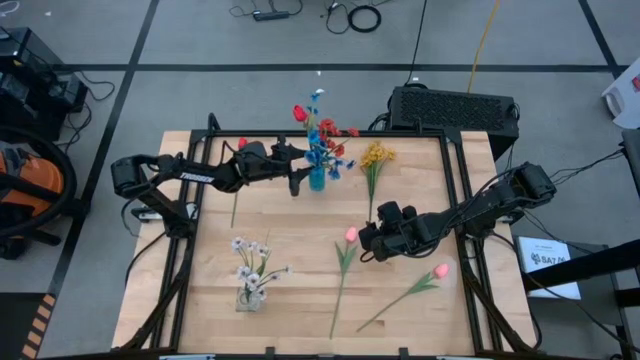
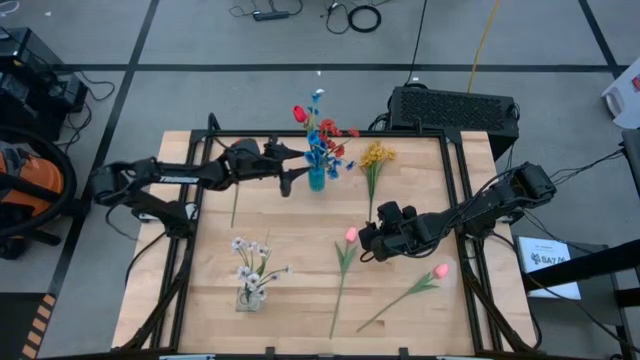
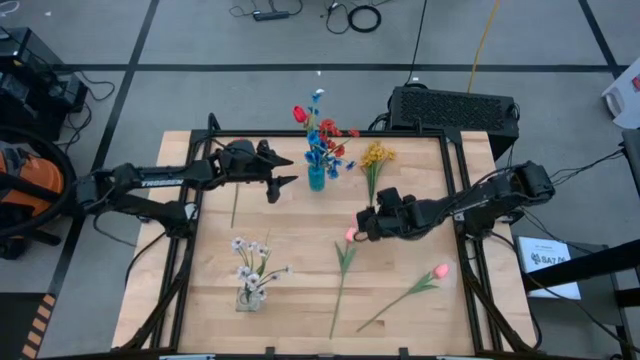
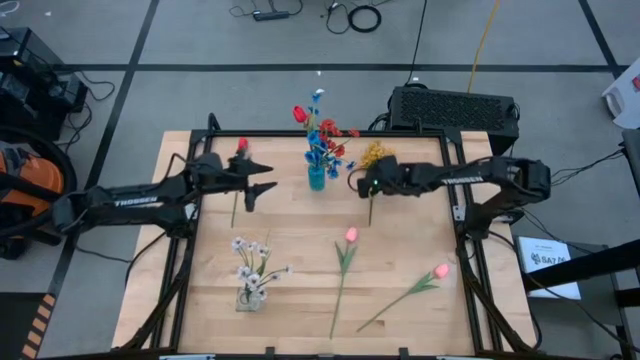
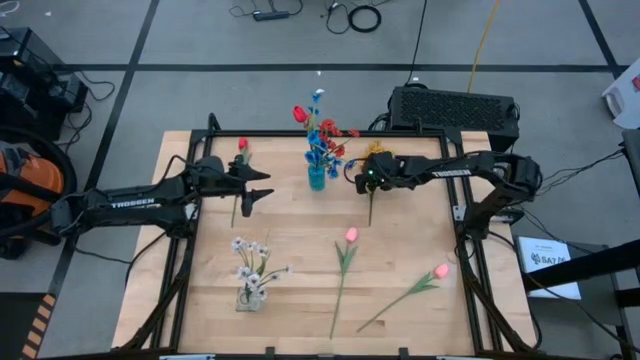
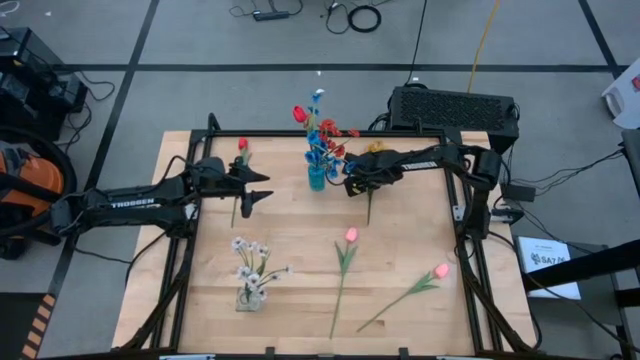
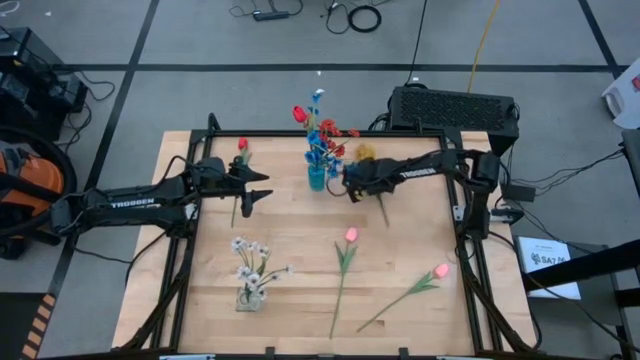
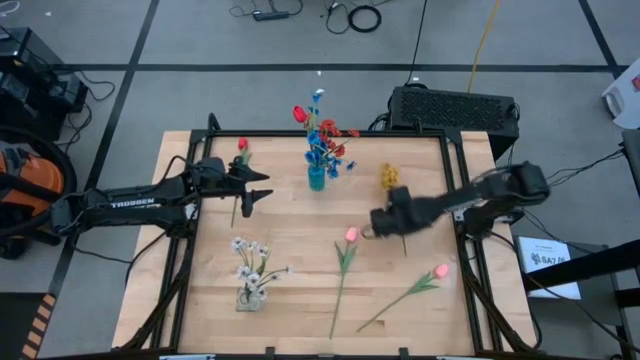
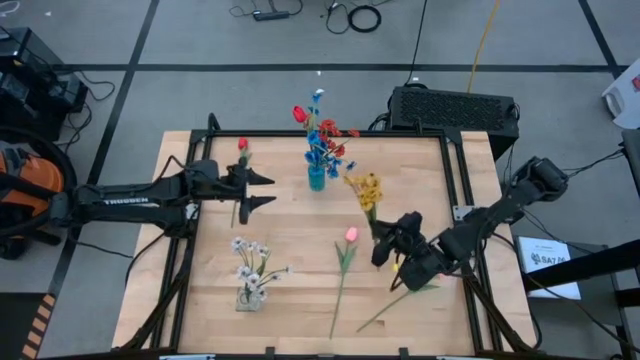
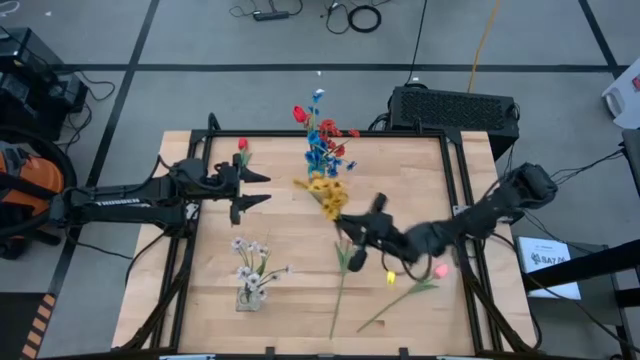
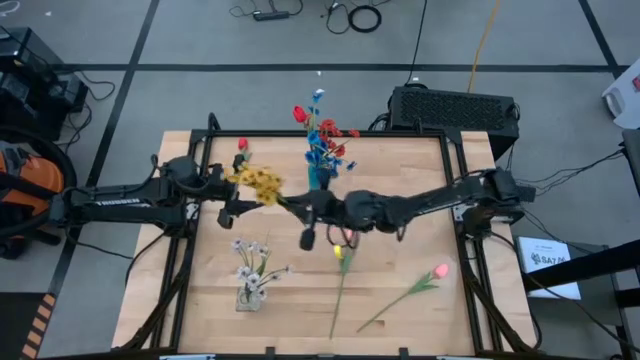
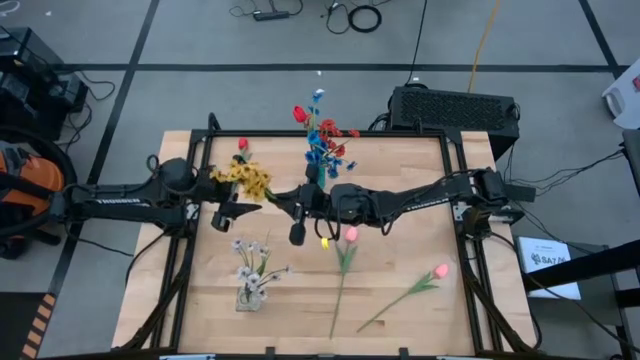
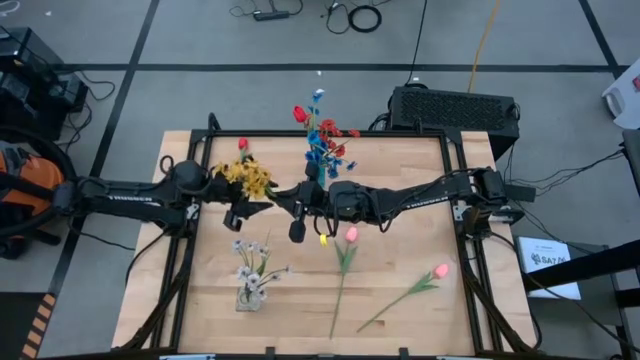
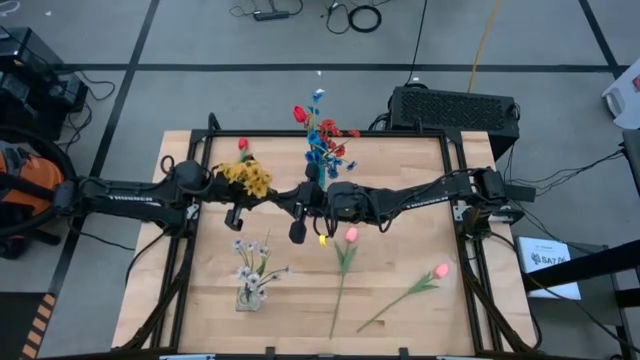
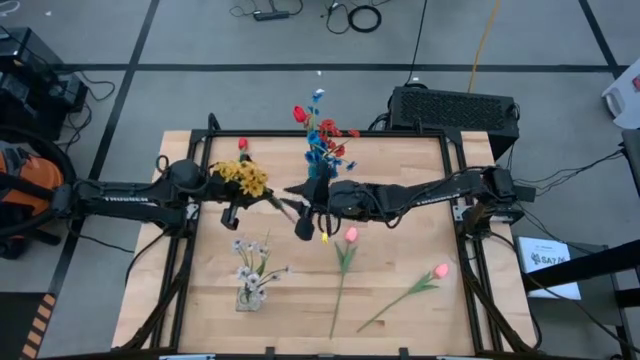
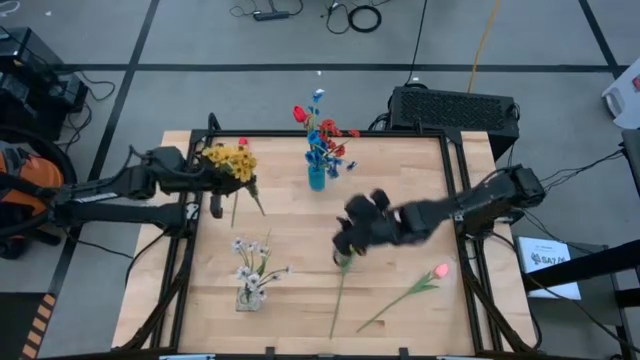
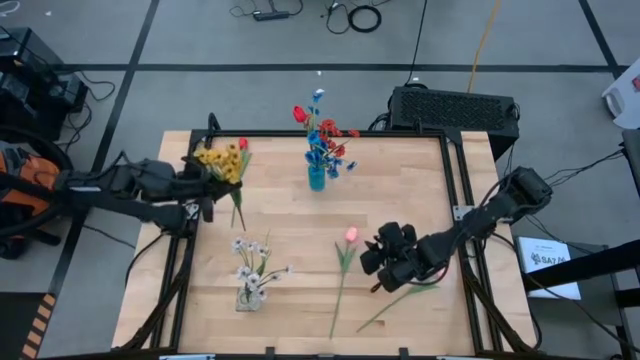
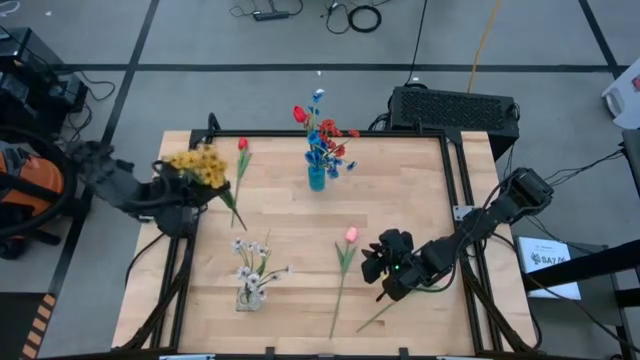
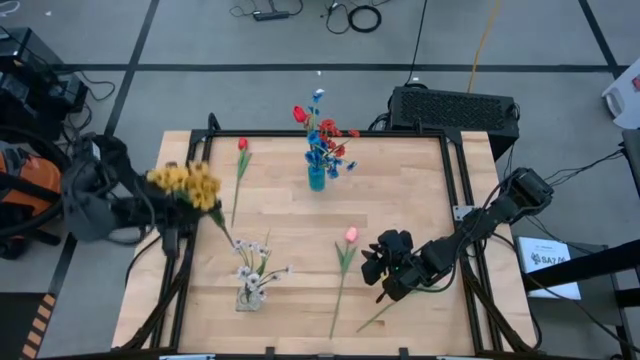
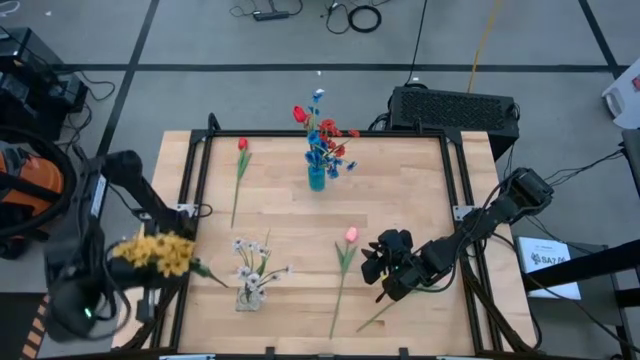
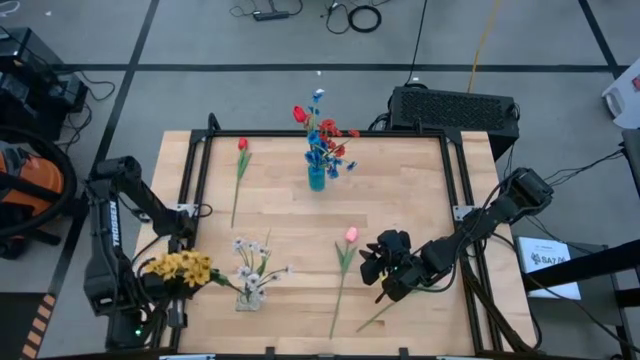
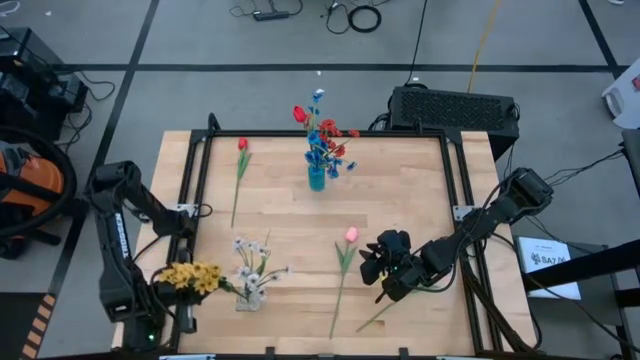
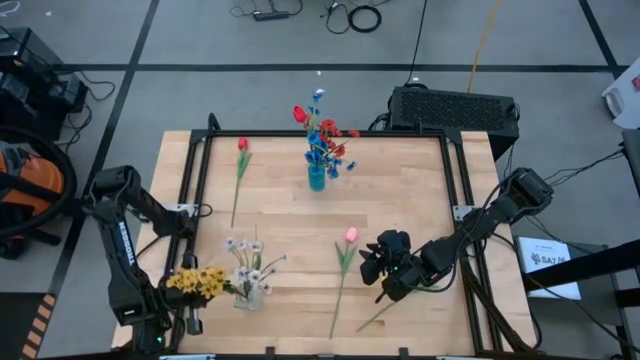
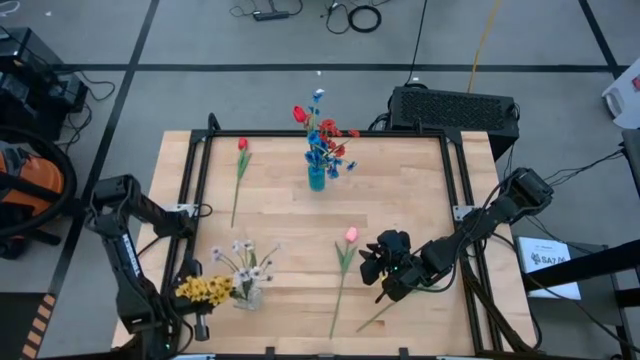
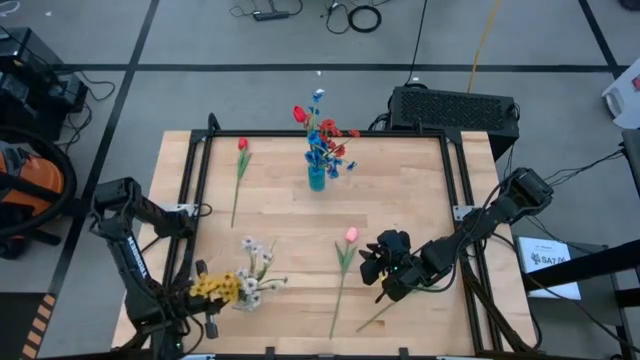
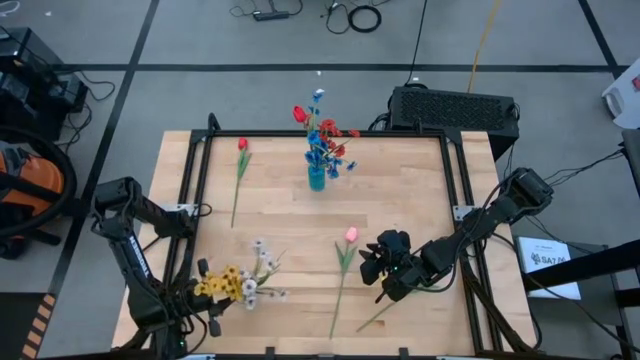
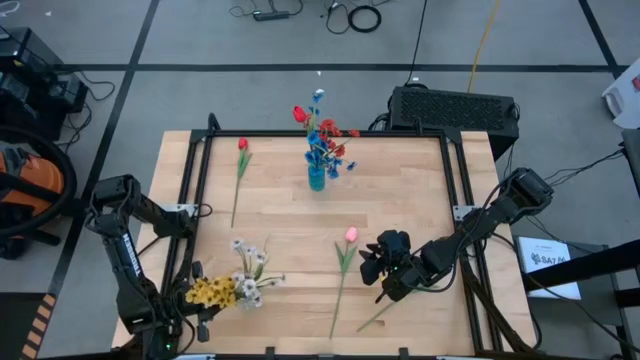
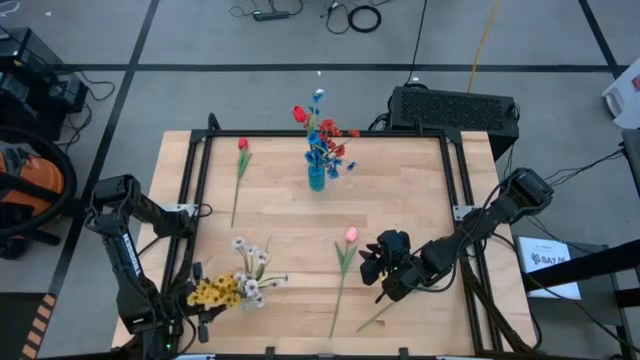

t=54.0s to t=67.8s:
Task: Sort flowers into vase by color
Put the yellow flowers into the transparent flower vase

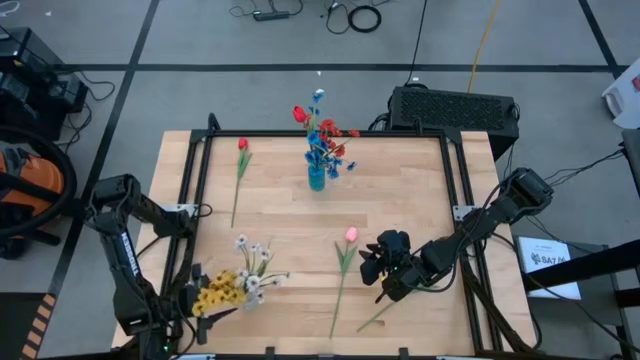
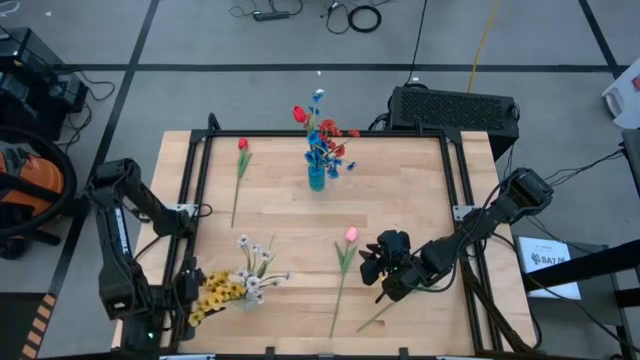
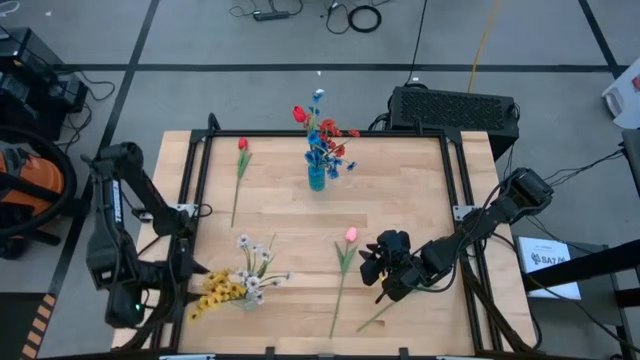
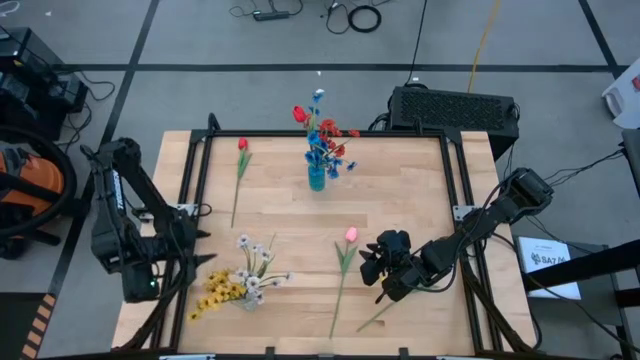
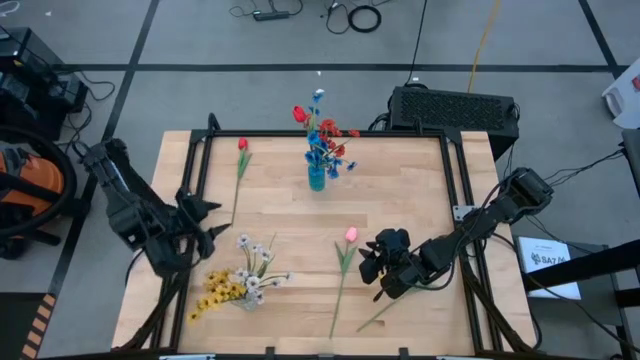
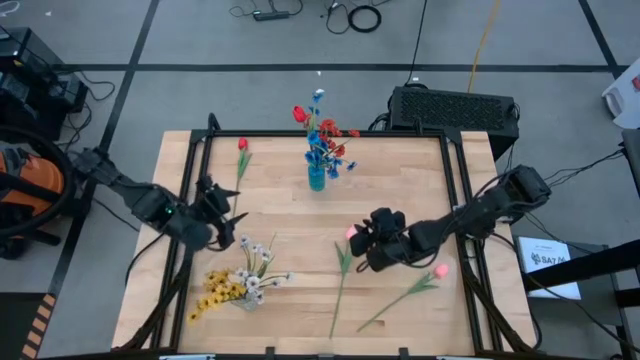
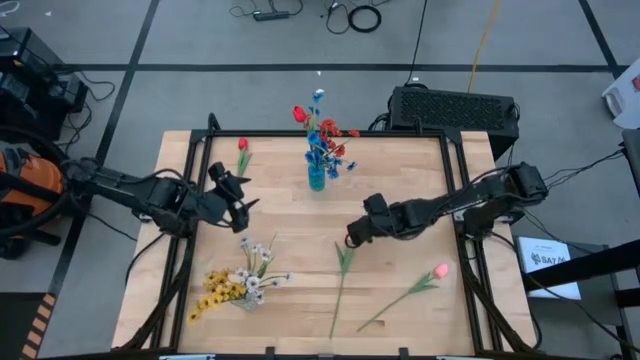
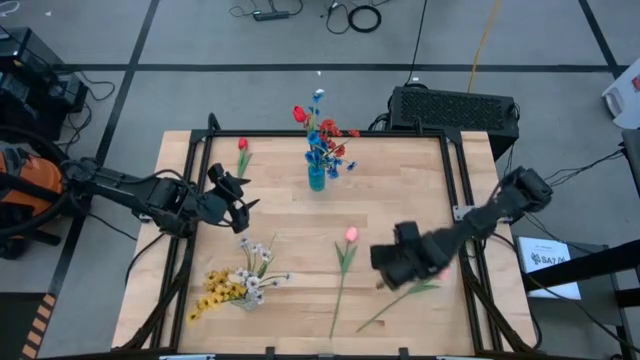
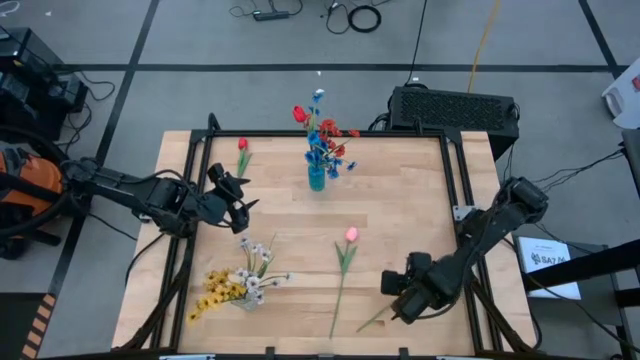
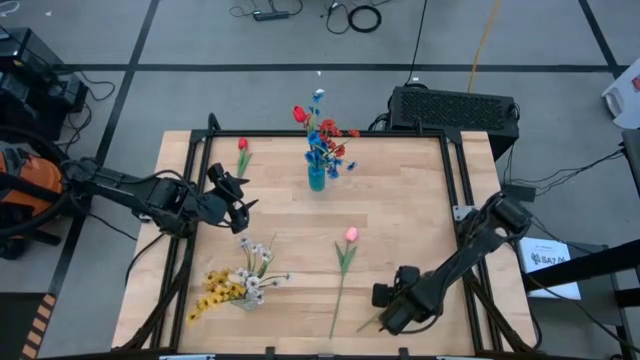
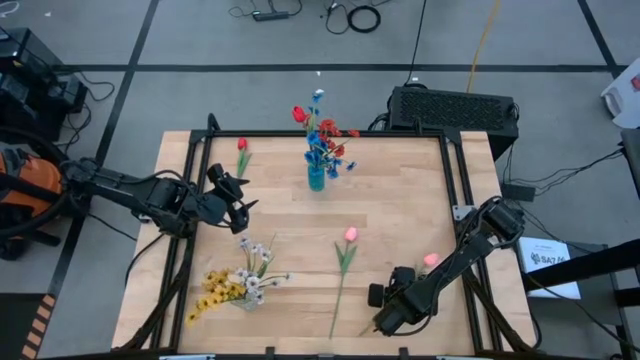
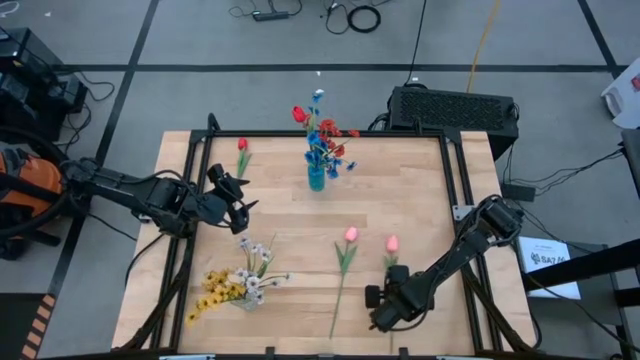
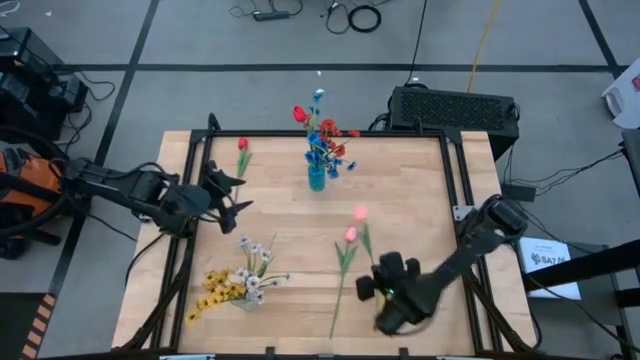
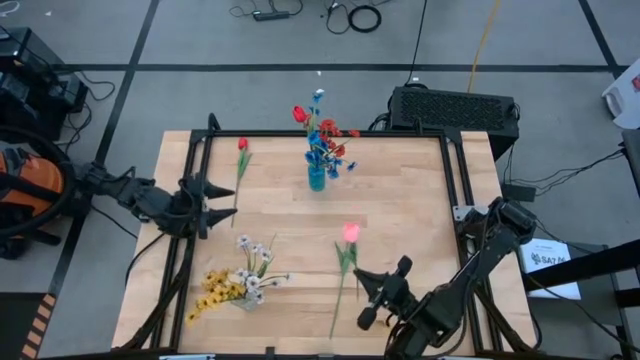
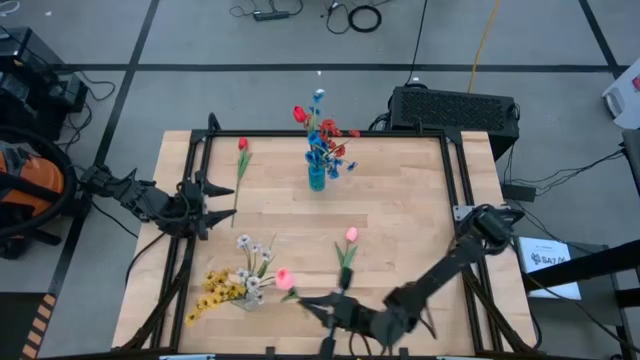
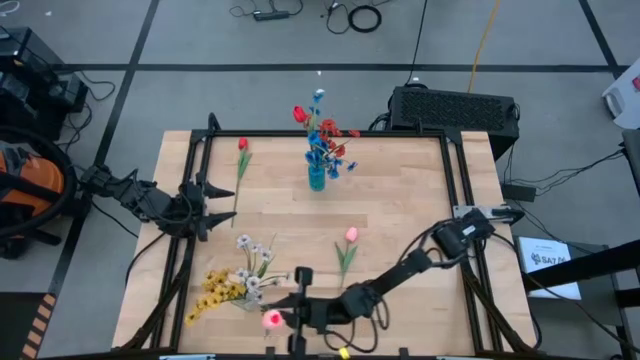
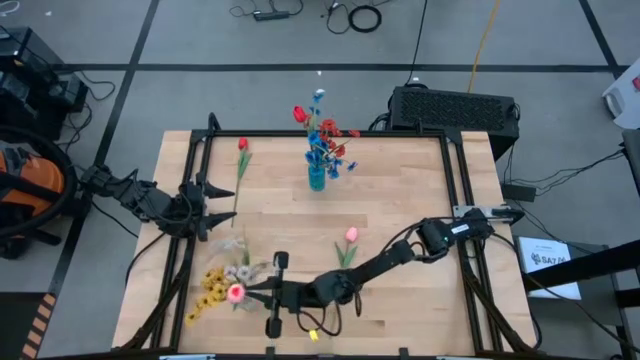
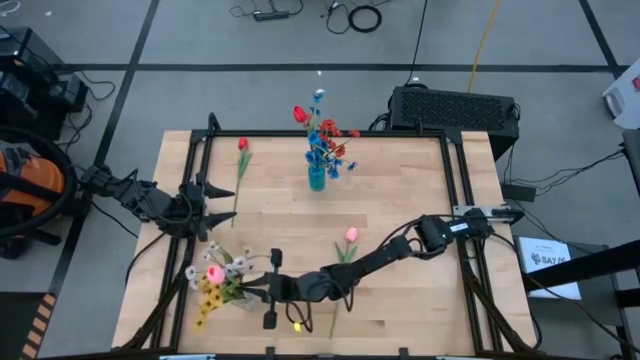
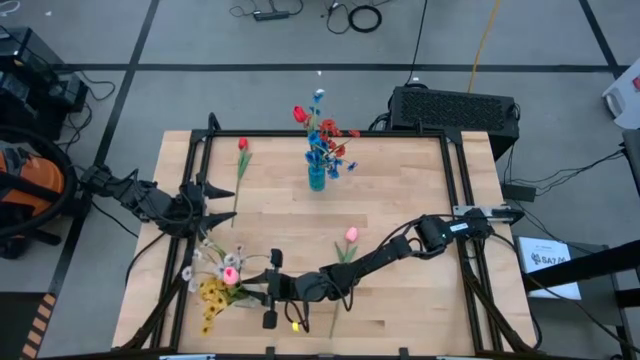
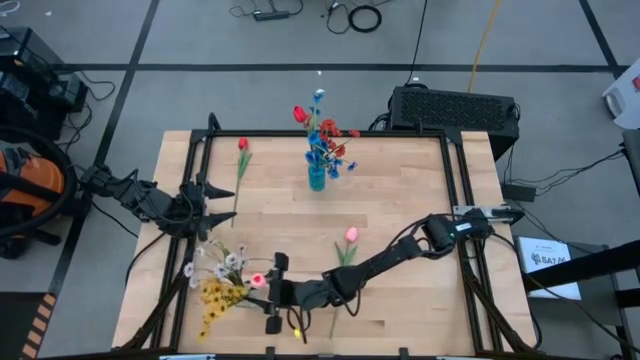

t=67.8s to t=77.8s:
Put the right pink tulip into the transparent flower vase
